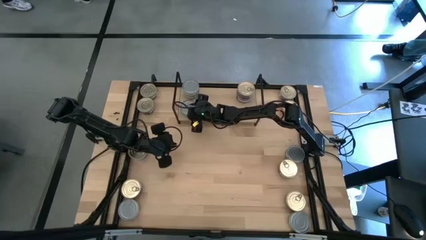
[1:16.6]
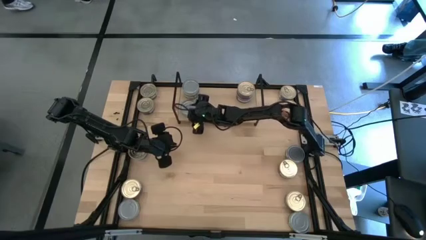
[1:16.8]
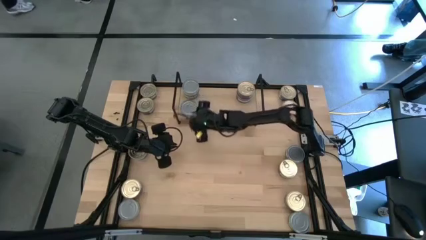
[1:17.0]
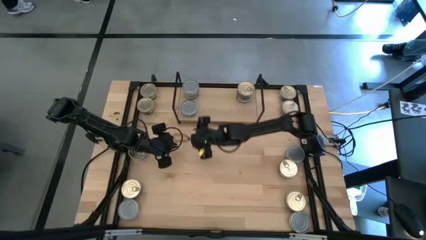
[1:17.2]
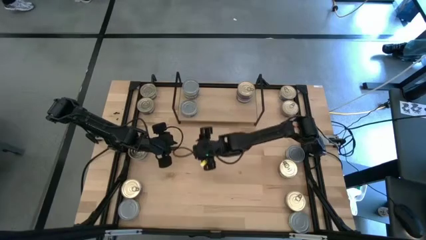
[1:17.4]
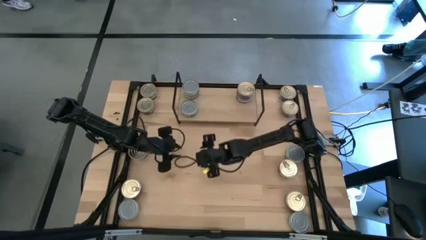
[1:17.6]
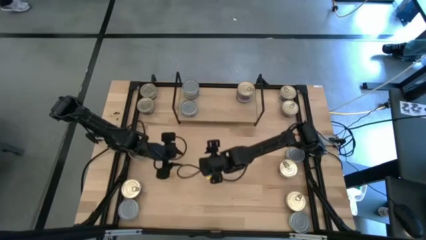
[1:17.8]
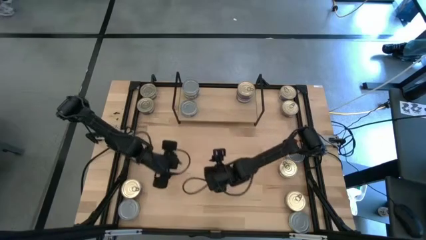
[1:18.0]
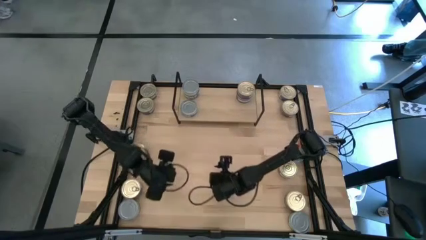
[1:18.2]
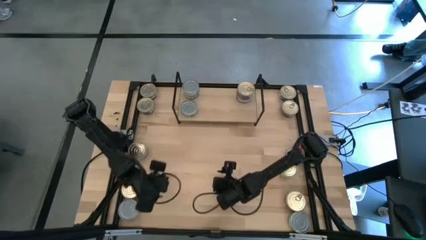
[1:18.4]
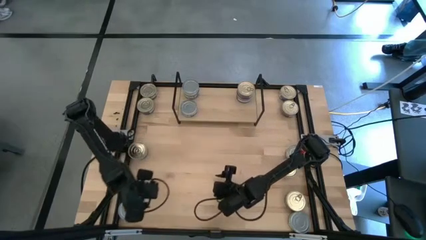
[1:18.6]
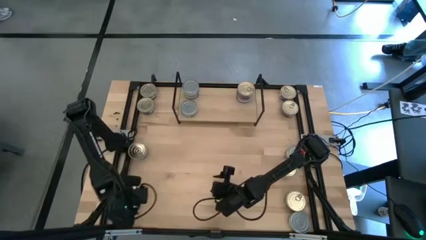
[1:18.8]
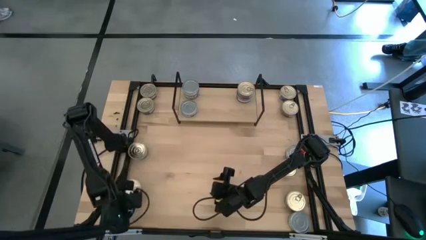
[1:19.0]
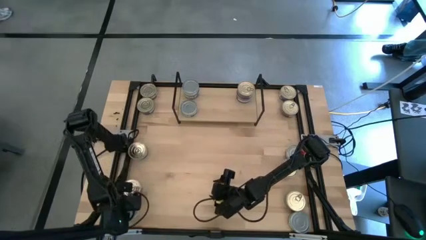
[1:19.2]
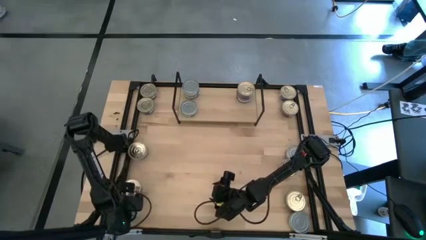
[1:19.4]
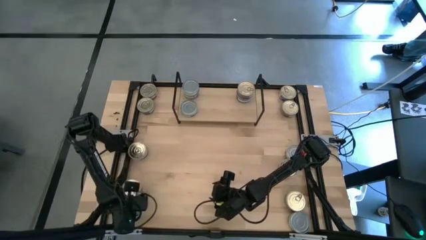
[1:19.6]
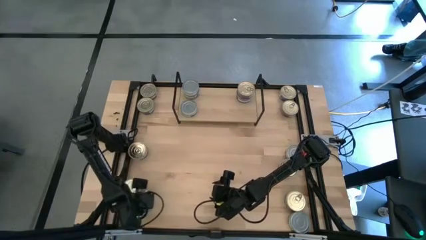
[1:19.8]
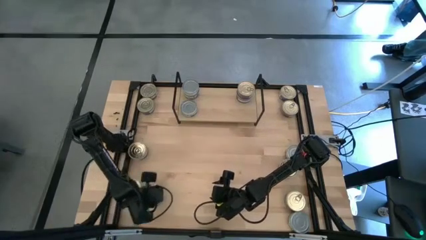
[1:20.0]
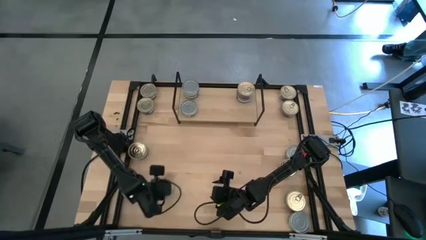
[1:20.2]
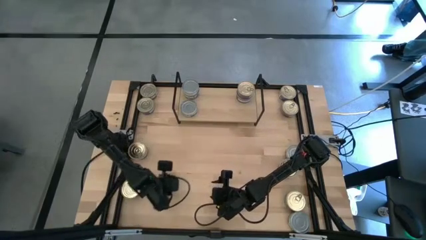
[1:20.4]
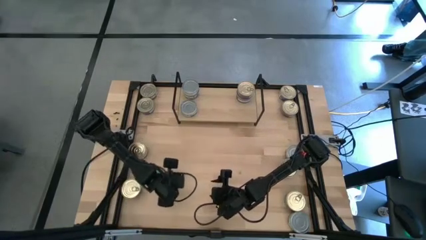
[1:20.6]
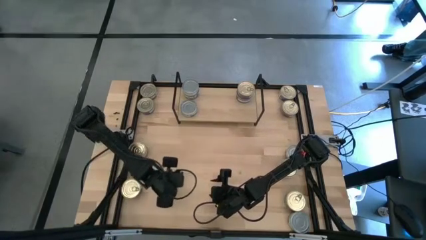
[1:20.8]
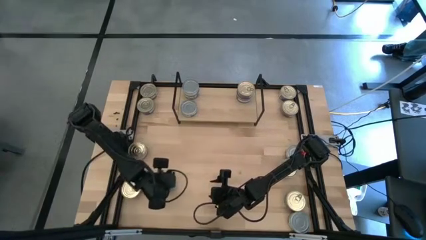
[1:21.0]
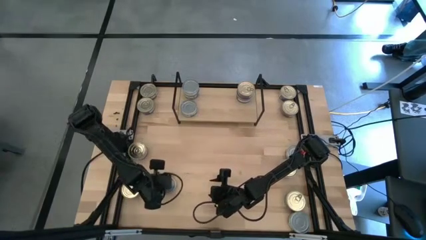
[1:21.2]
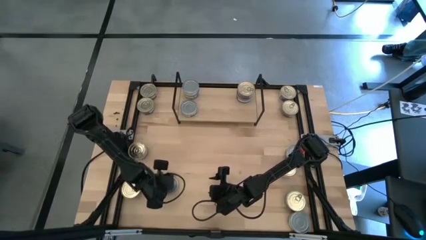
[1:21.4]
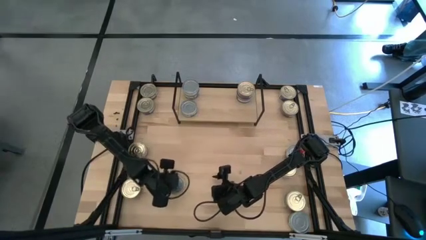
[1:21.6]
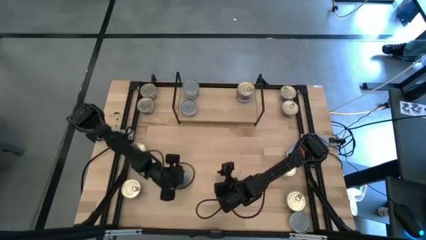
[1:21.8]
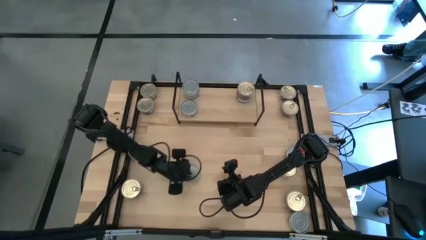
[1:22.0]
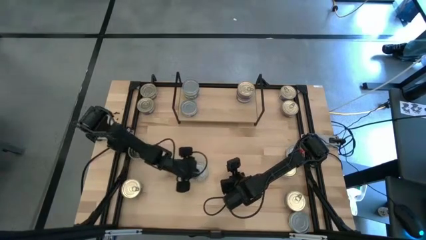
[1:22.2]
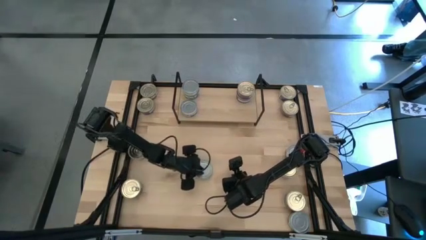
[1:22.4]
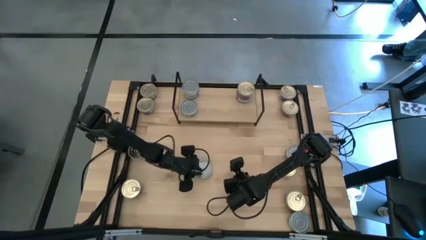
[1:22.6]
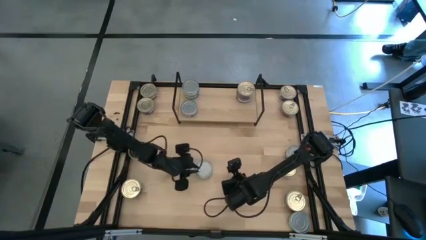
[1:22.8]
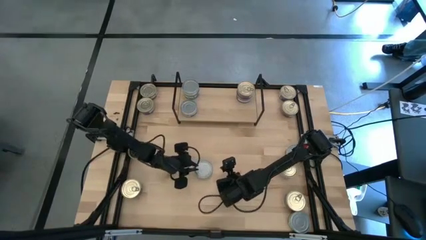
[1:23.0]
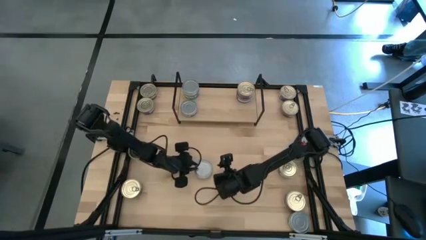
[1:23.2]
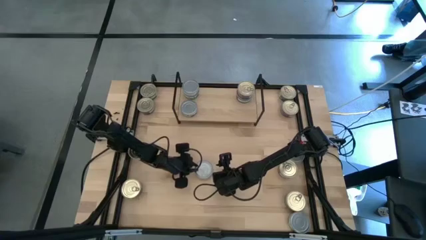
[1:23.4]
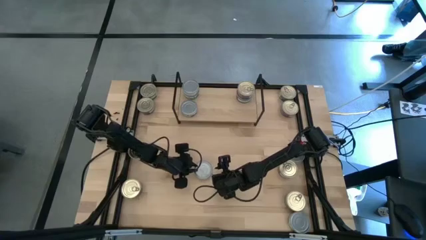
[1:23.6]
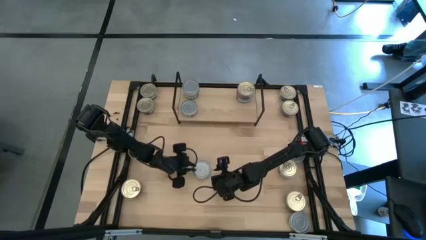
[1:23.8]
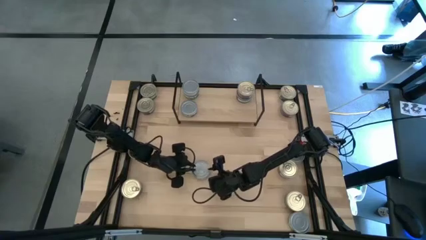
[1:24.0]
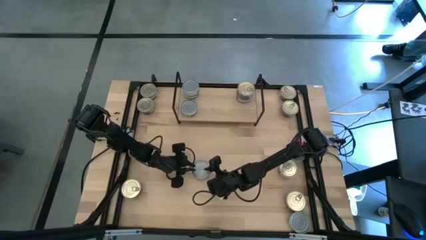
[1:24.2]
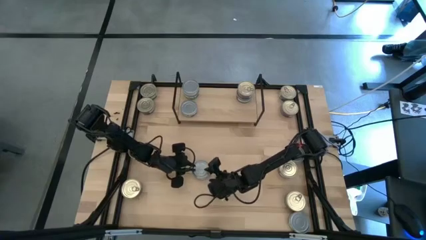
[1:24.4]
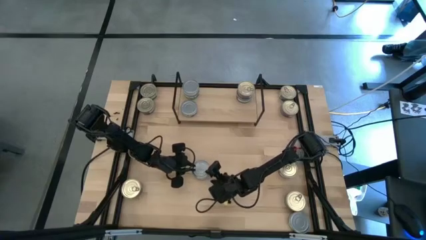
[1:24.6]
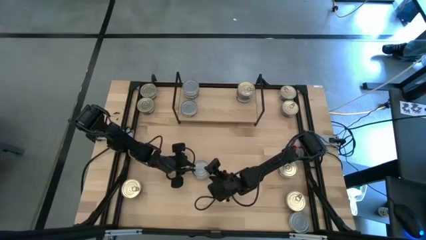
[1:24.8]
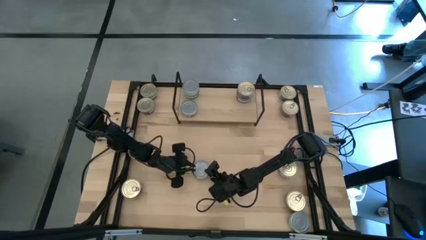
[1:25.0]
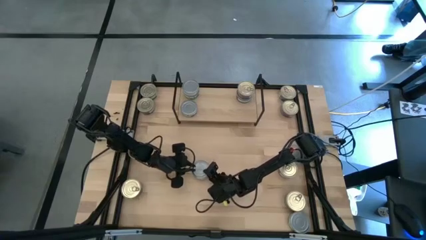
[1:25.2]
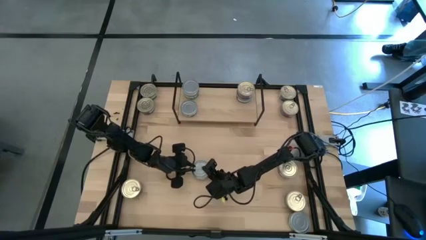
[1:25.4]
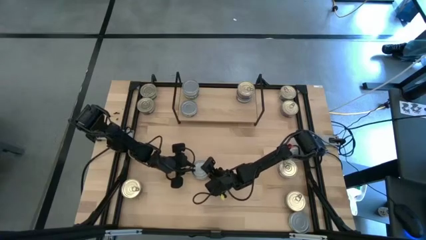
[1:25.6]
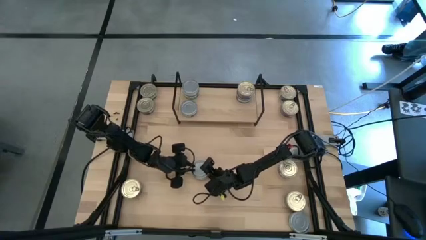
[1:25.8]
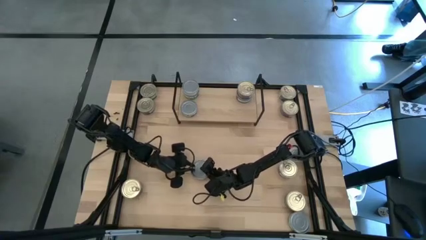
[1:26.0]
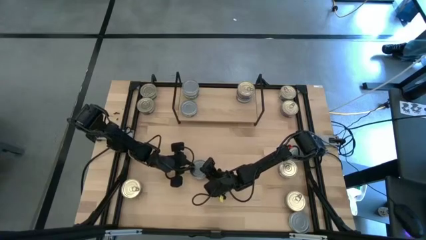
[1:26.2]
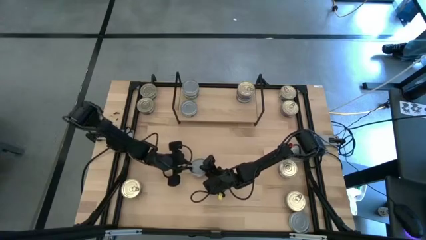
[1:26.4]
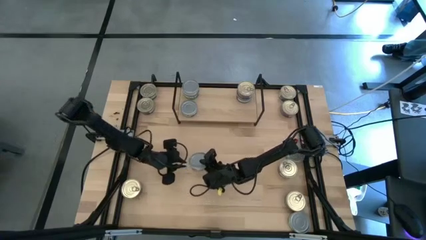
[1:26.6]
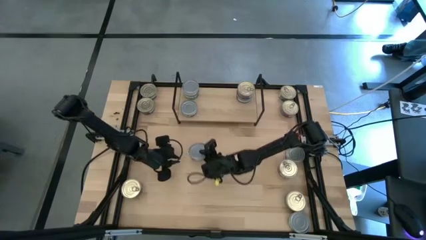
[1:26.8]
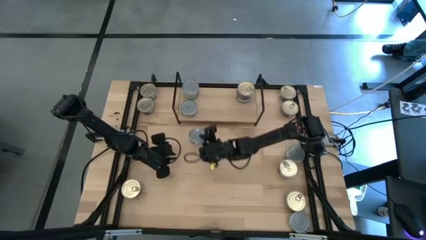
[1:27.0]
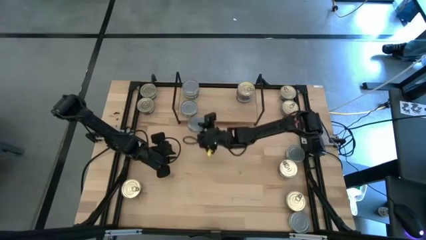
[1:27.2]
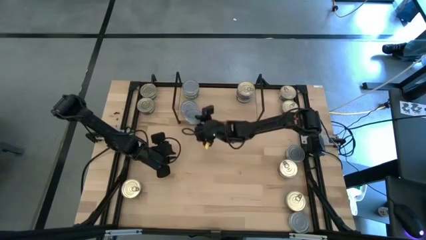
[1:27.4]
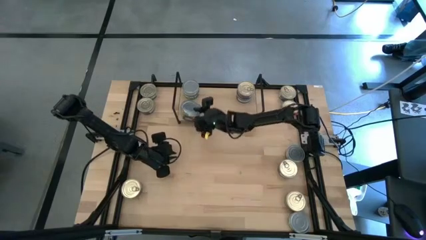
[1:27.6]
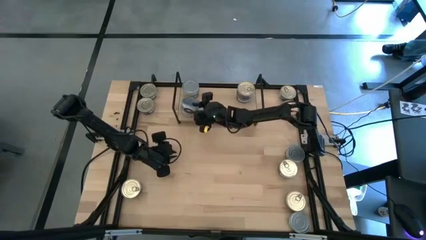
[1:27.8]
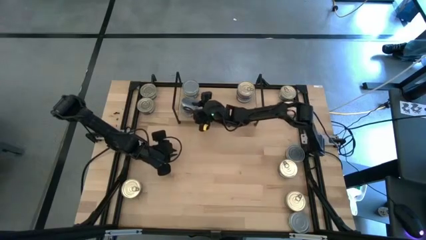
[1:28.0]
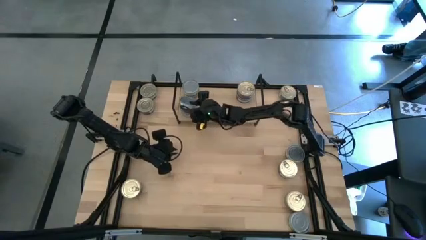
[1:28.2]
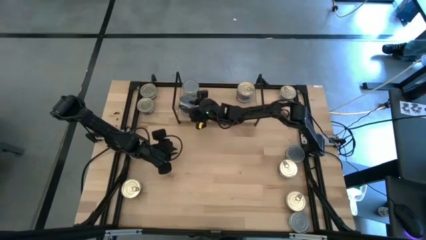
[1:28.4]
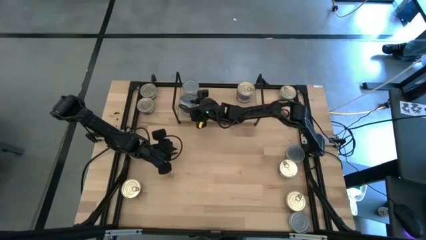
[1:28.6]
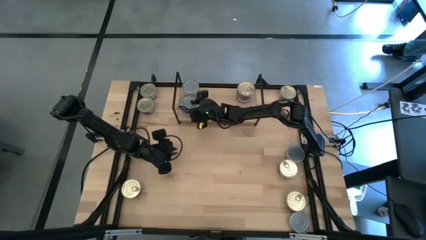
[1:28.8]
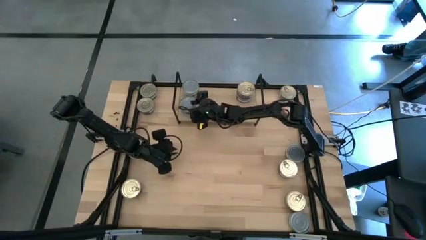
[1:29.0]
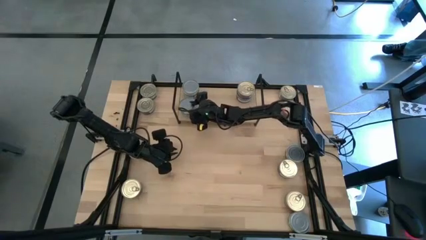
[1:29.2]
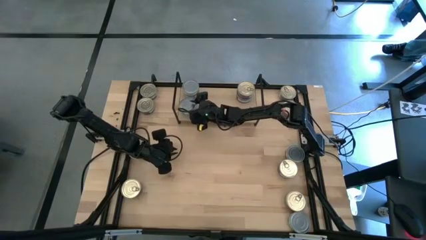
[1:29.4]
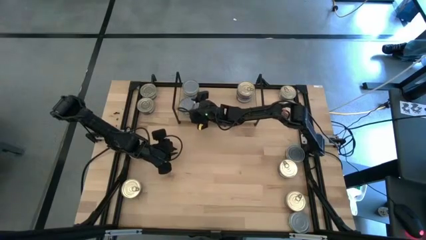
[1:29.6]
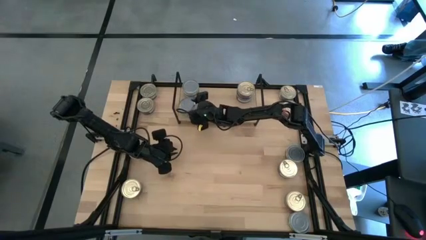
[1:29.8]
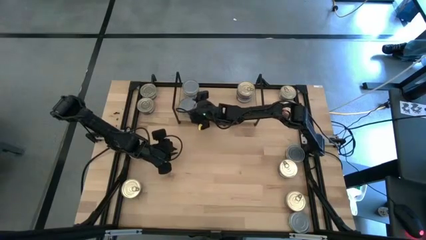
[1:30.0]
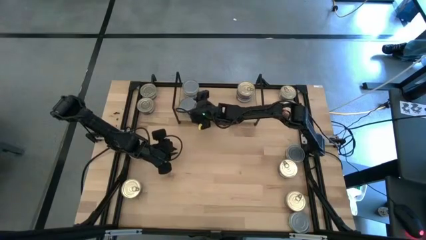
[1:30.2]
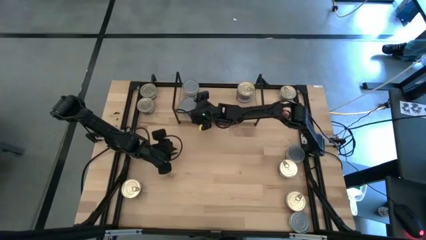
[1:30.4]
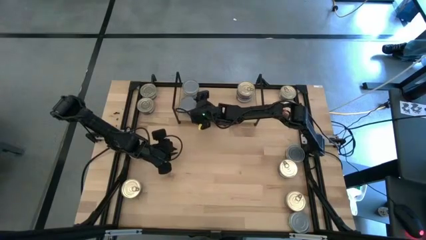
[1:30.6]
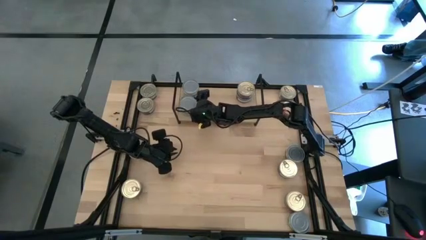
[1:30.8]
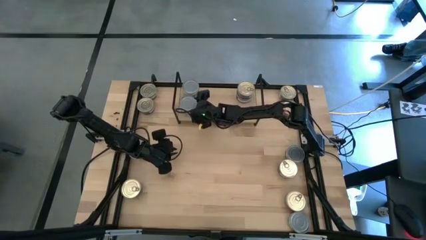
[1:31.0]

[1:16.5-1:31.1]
Task: Stack canned seafood by type on shelf
Stack the green white tuna can on top of the other green white tuna can on the shelf

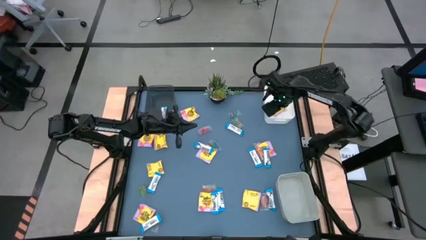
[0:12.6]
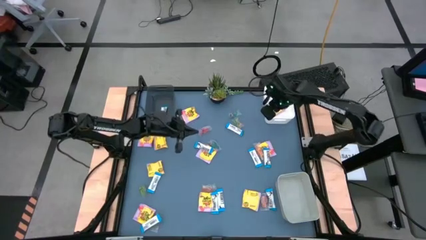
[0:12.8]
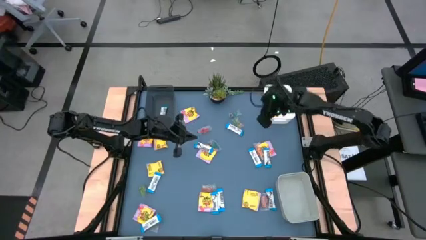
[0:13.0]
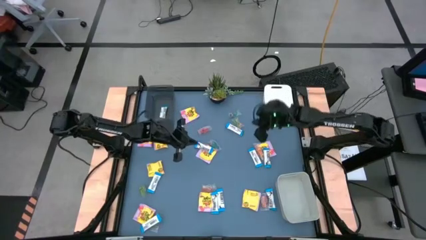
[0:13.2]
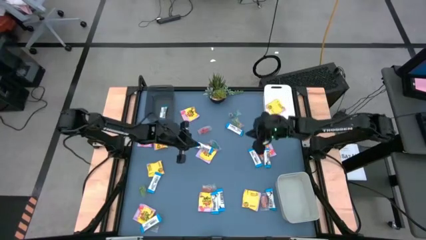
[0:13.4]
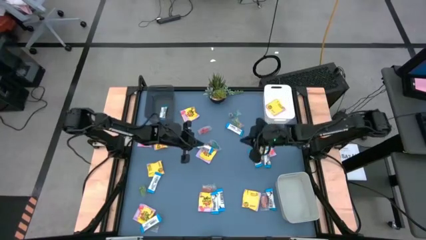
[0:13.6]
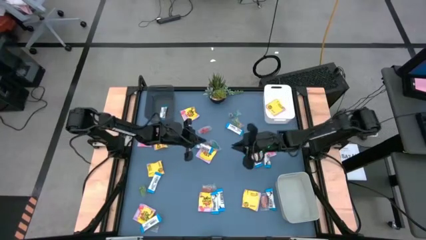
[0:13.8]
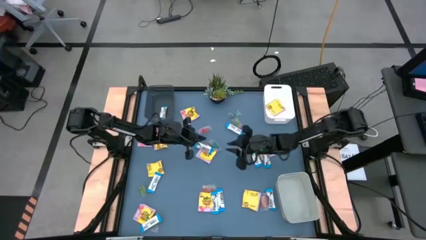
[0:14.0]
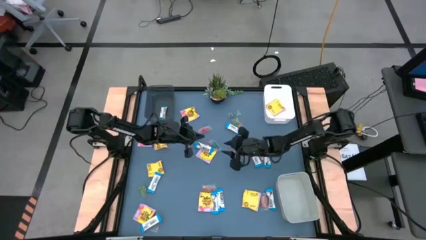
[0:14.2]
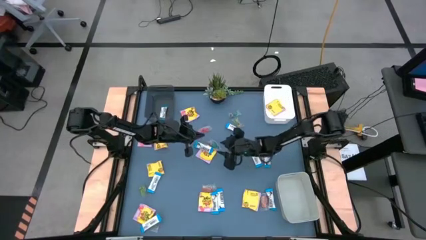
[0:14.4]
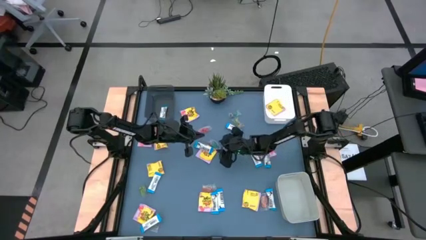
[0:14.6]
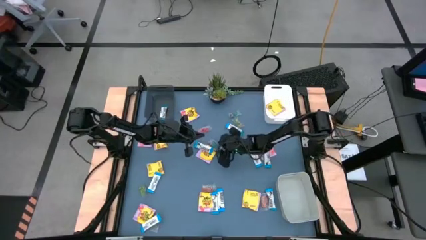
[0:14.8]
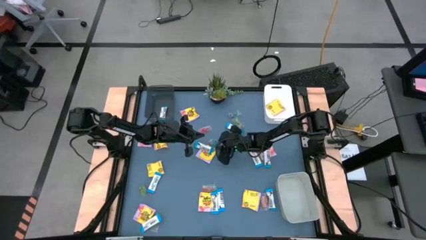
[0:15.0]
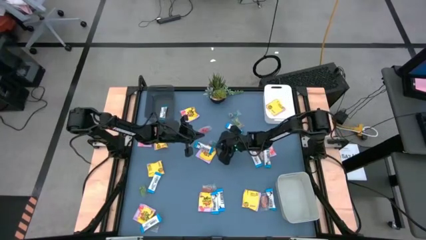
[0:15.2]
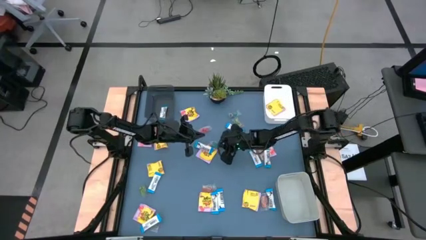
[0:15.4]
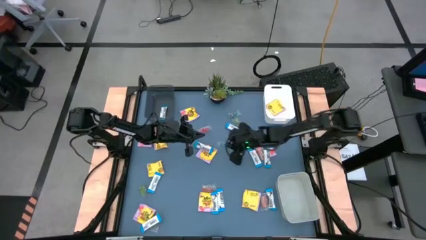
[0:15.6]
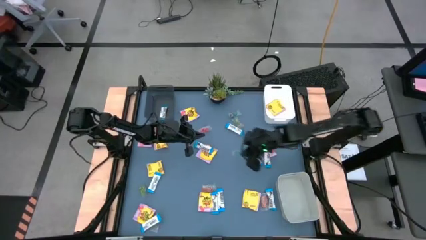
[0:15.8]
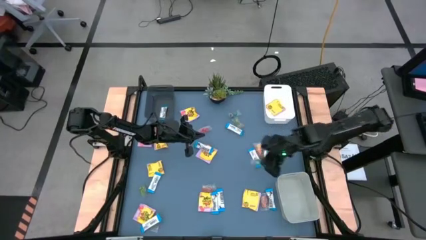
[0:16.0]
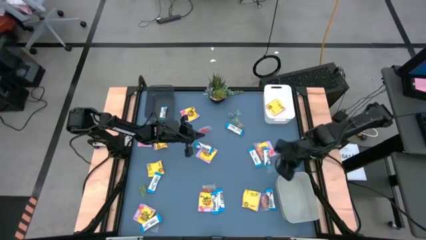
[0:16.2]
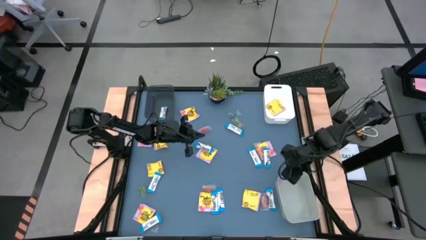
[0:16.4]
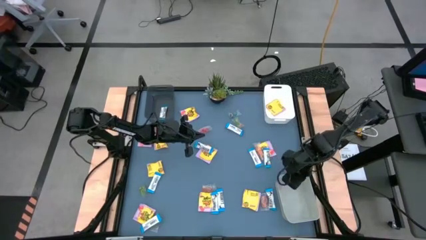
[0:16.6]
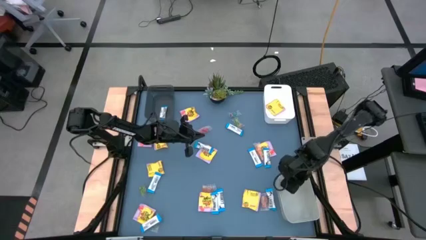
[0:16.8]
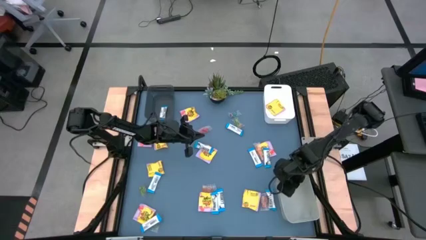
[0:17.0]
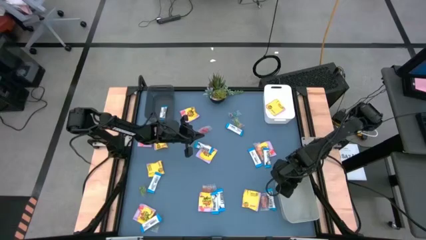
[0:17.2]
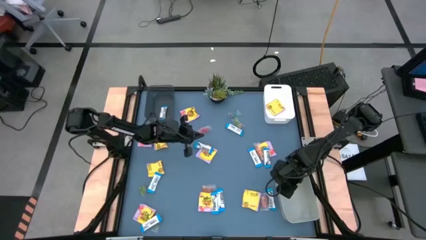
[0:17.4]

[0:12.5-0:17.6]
Task: Sort candy
Put the middle blue gummy candy into the grey bin
